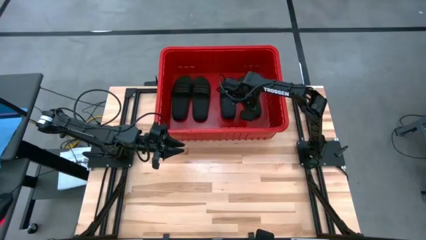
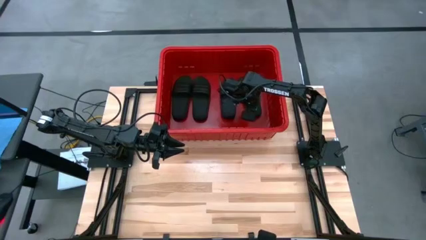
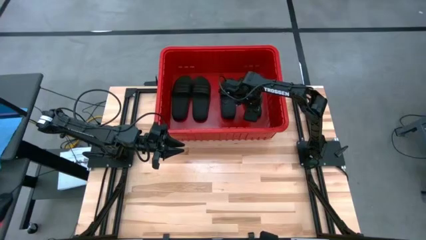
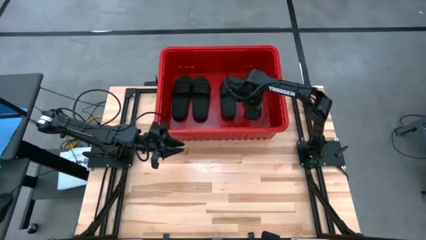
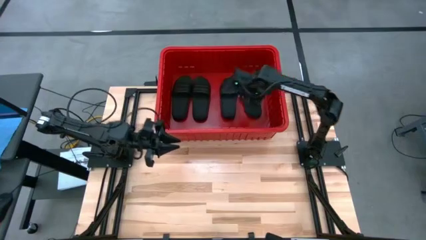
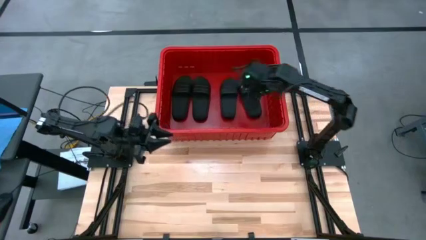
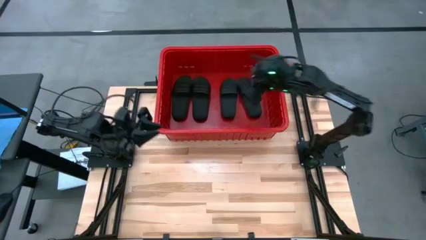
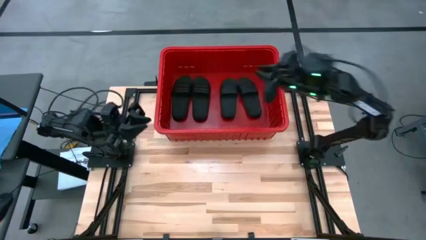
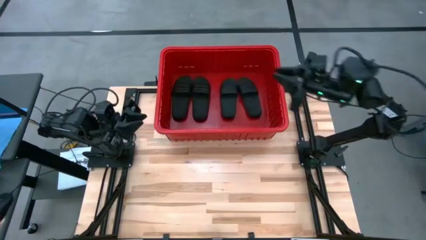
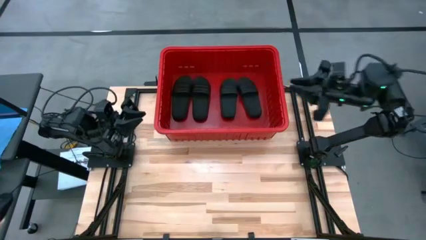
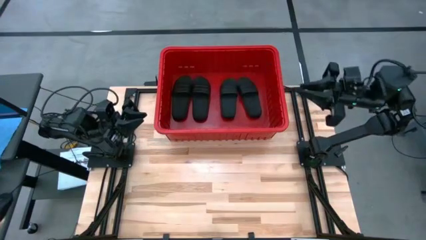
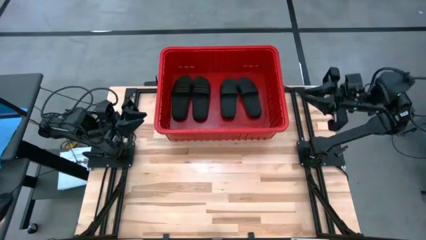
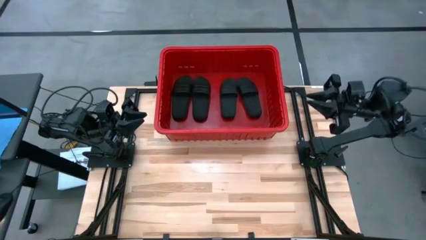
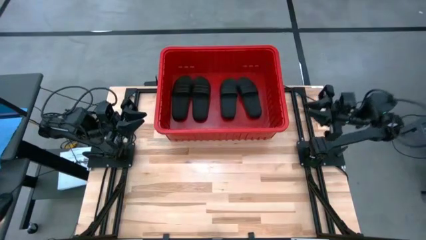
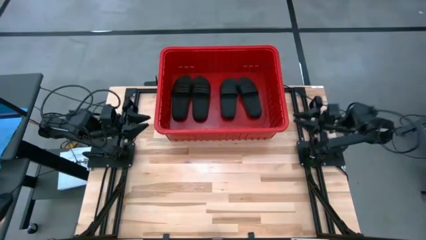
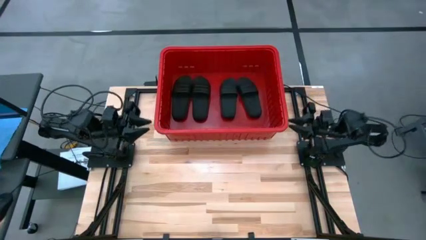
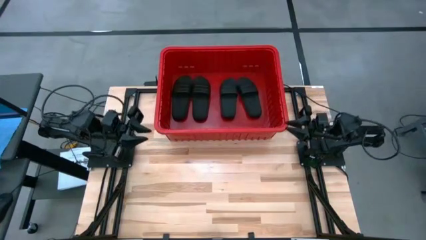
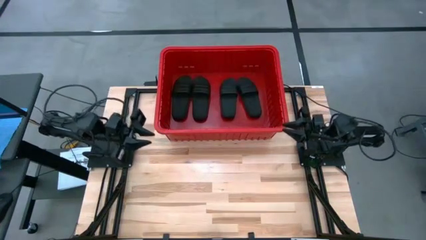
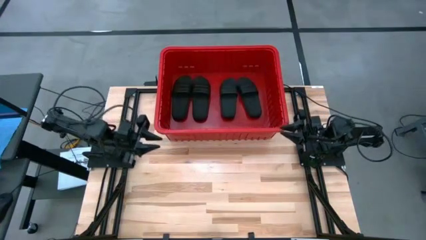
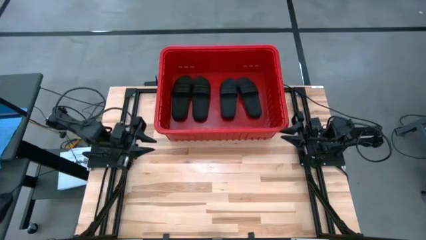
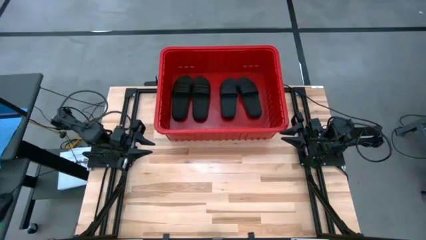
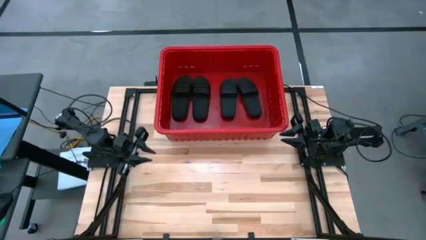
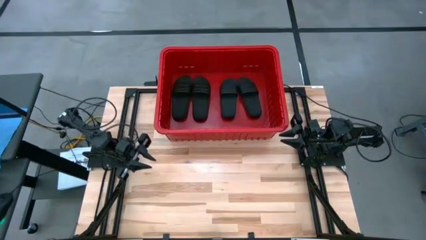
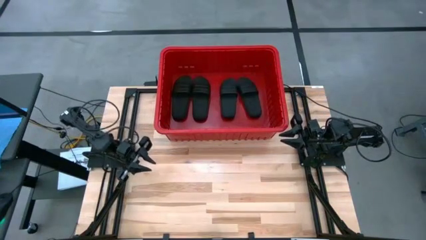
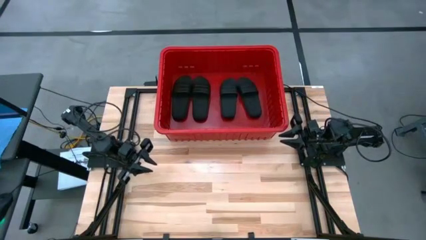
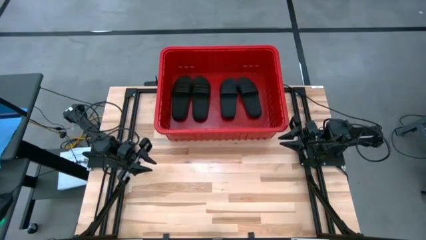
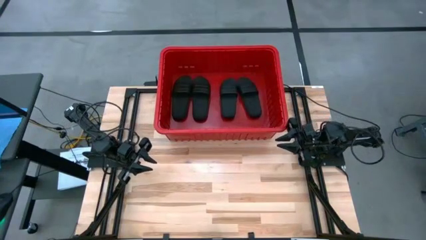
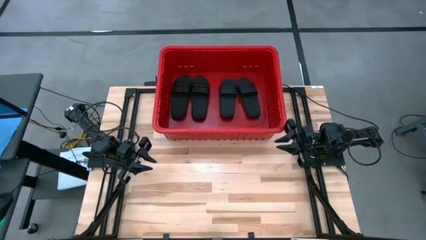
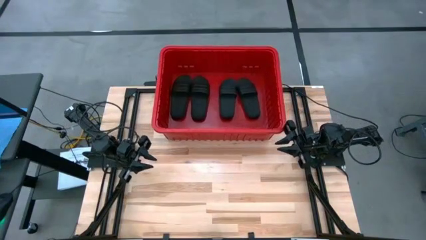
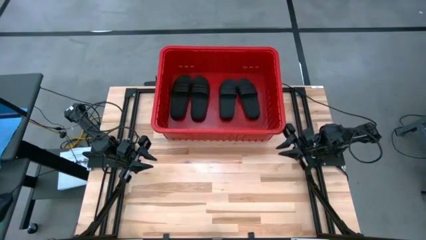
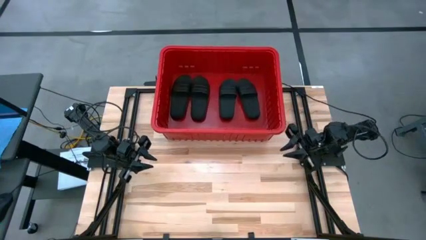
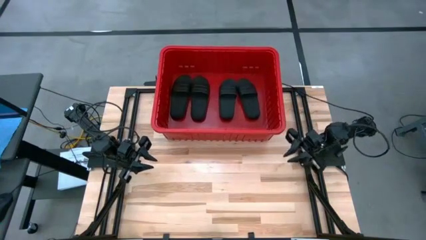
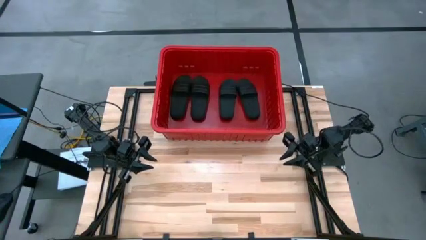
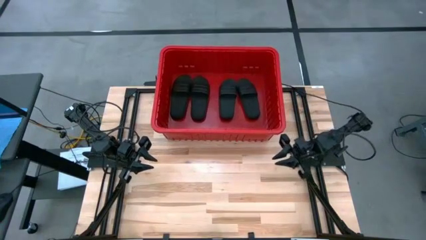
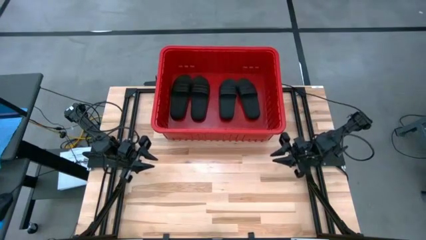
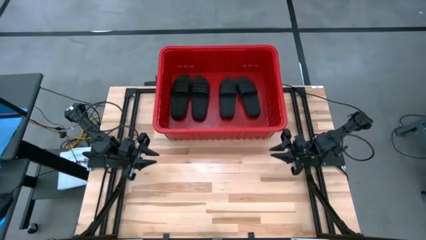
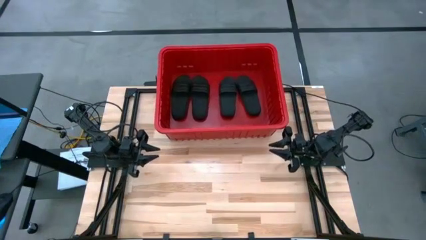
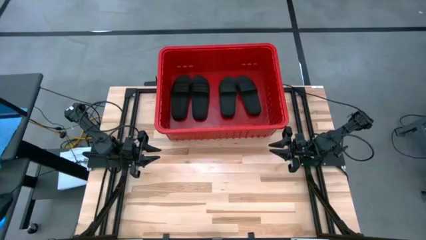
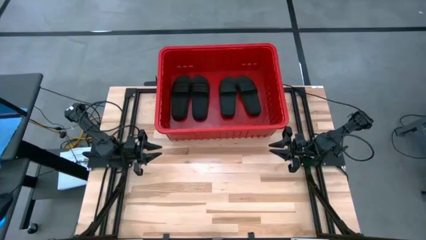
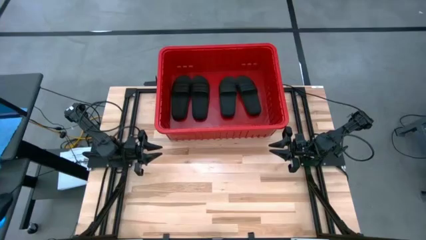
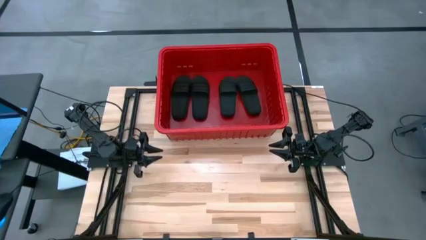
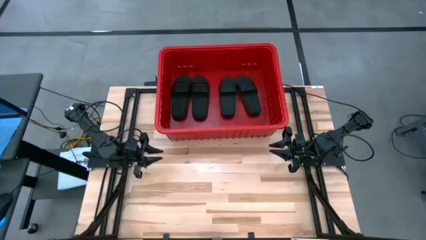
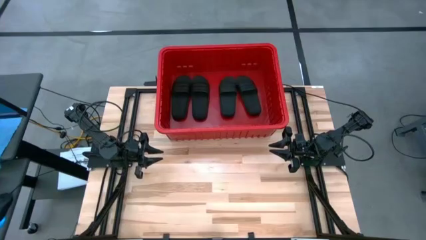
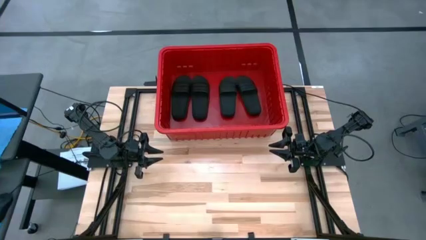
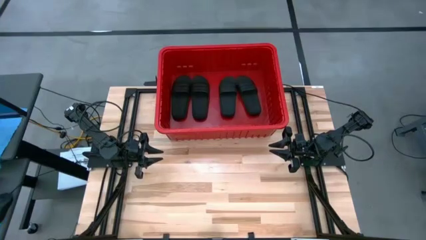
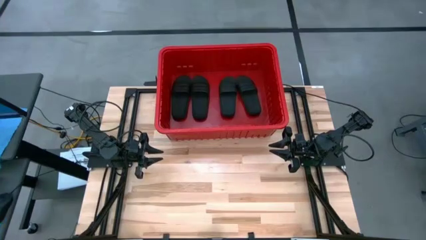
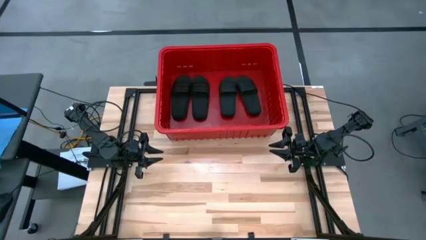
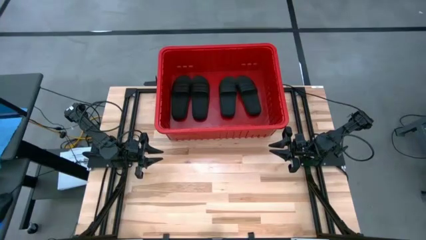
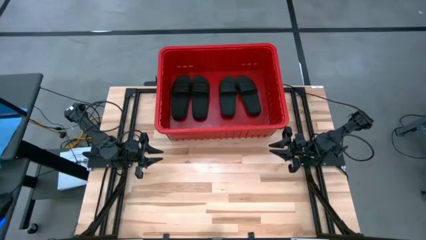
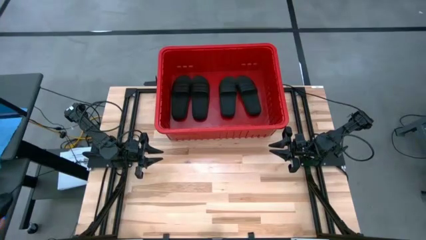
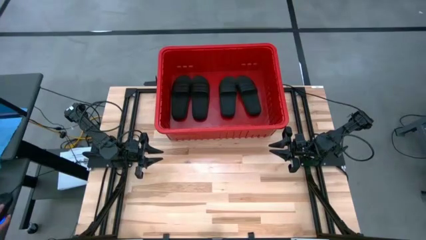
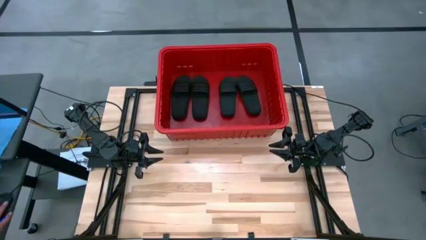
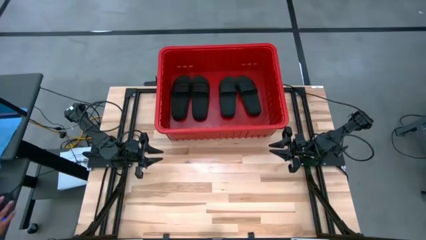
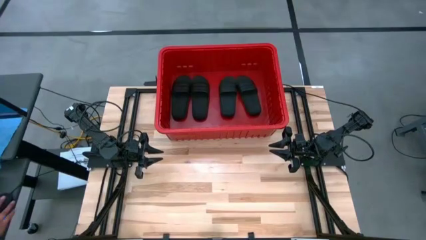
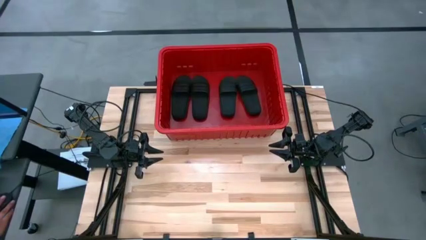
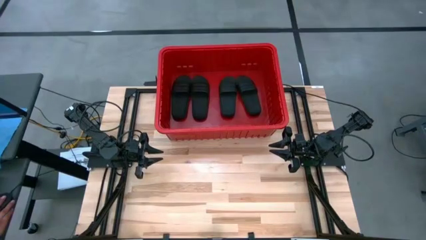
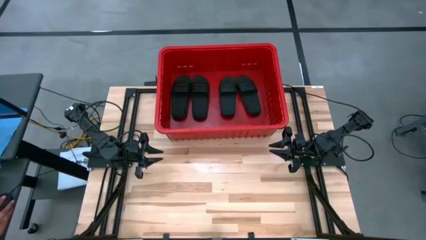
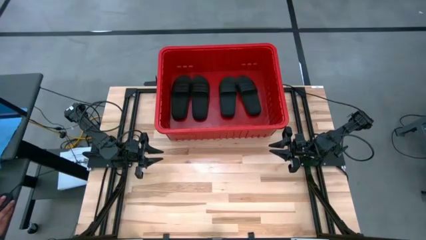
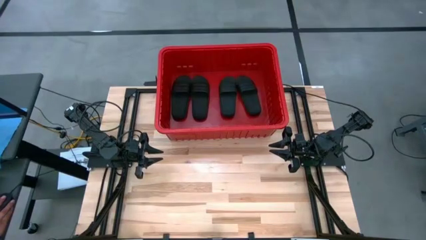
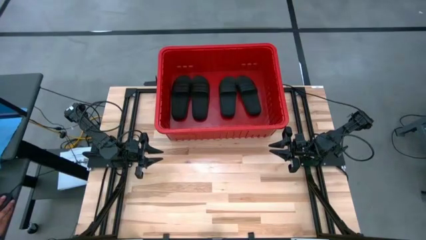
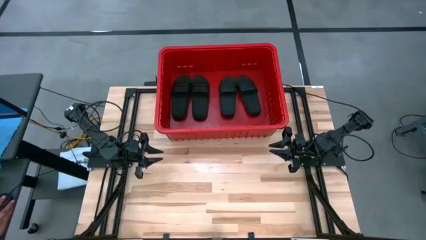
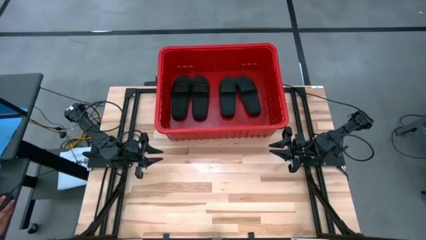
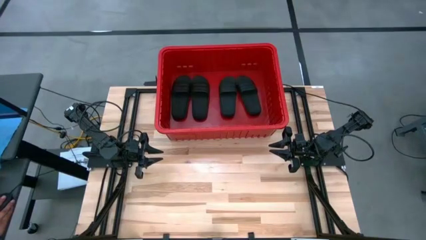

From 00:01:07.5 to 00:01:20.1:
Task: Pick and place slides into bin
Return to Home Position

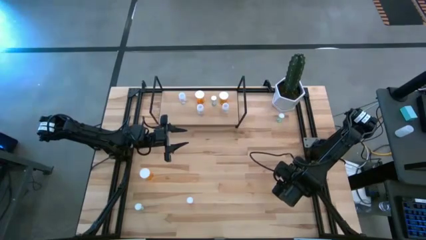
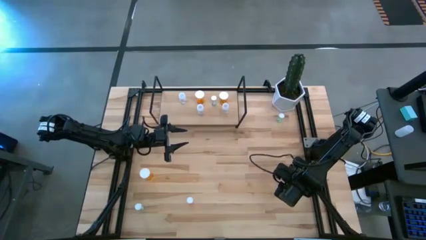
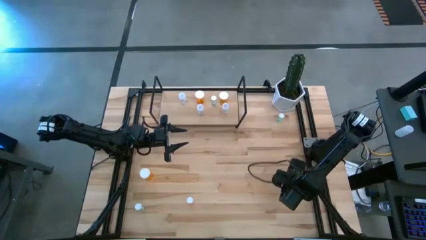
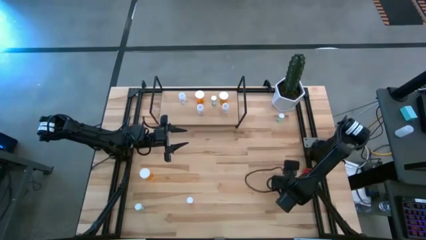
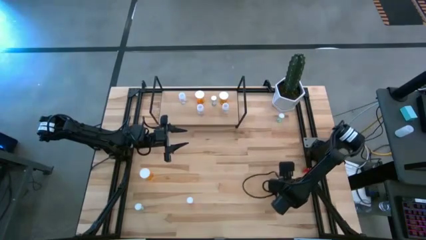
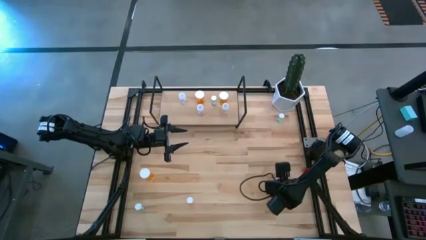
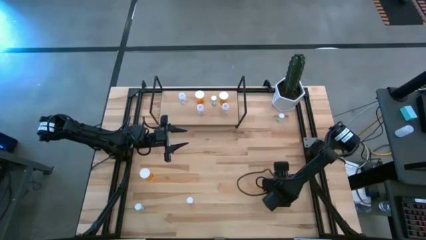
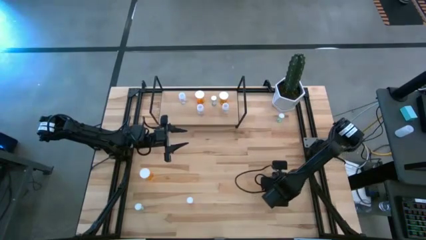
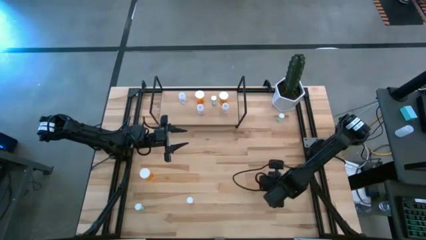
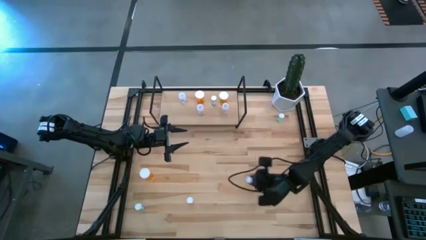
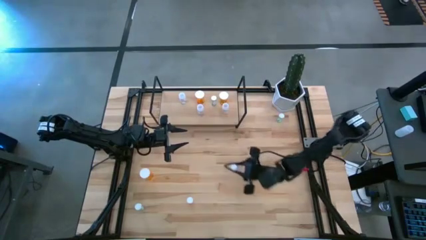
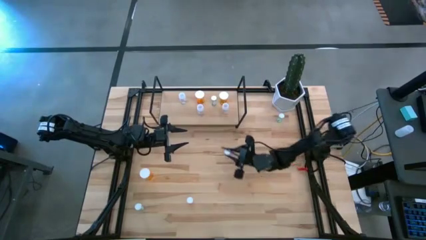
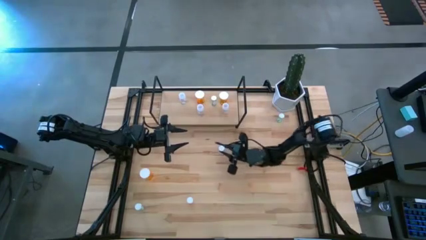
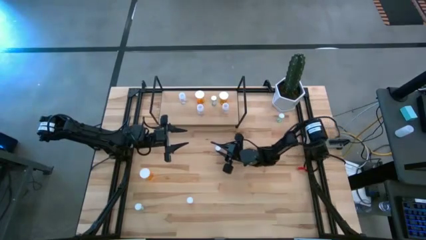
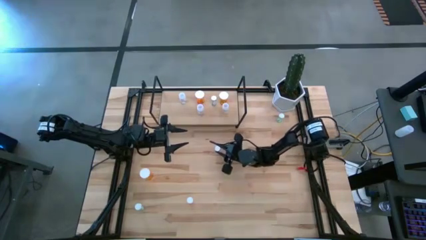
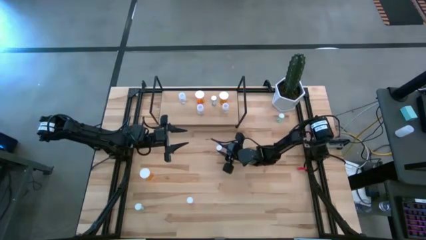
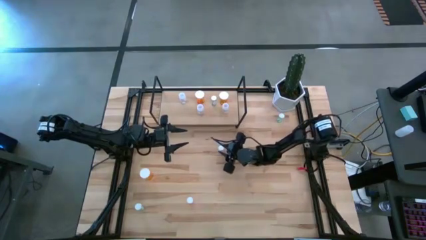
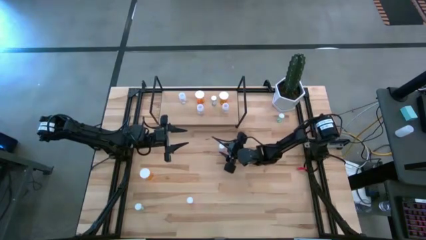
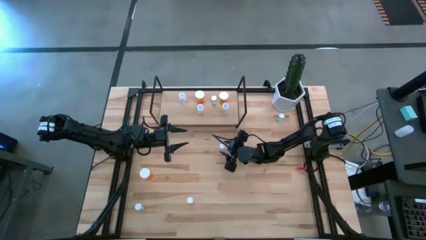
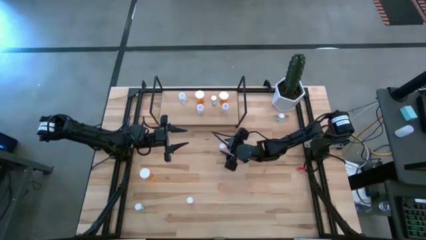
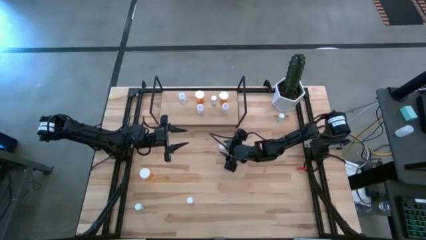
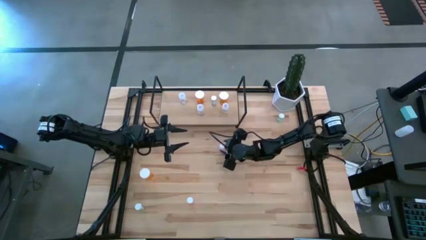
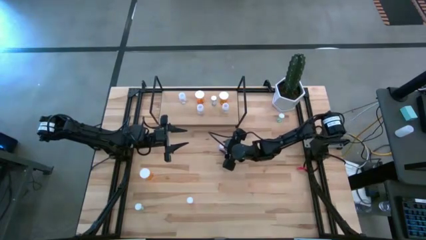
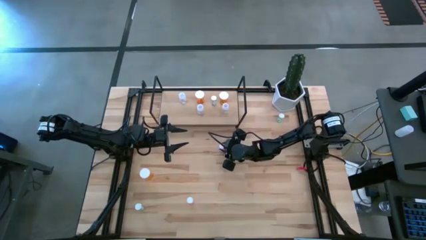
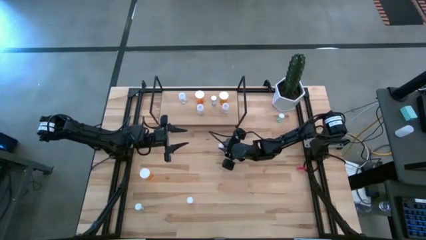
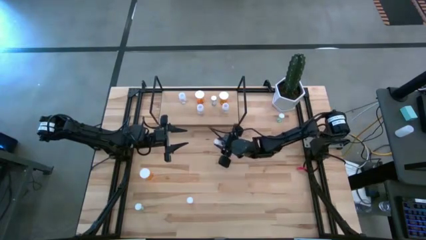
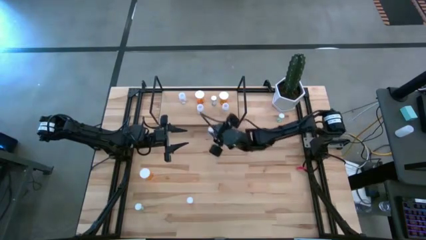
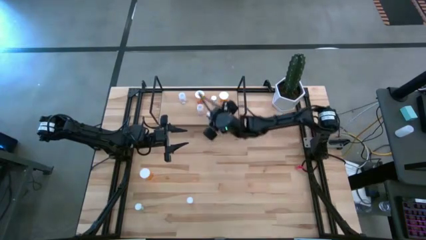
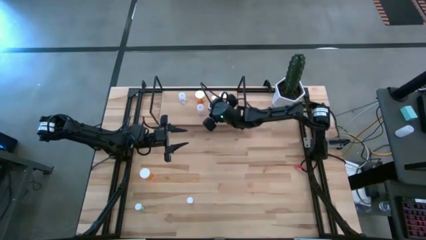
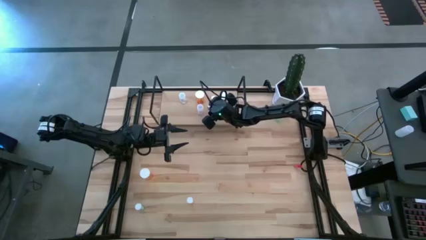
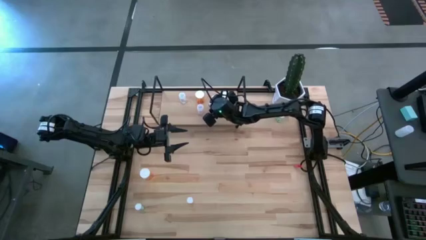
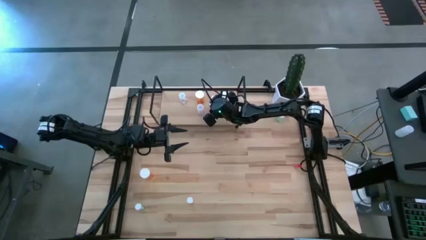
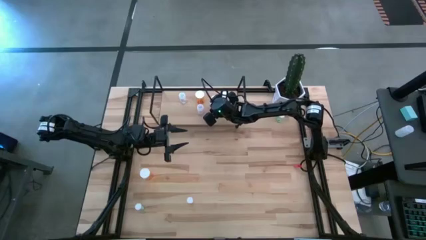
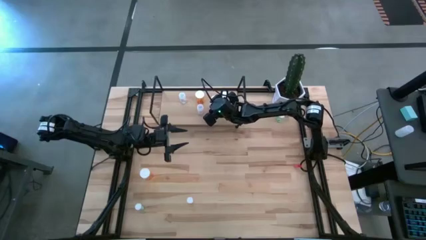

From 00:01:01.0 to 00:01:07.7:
Task: Pick and place medicine bottles onto shelf by color
Put the middle pink pill bottle on the shelf
